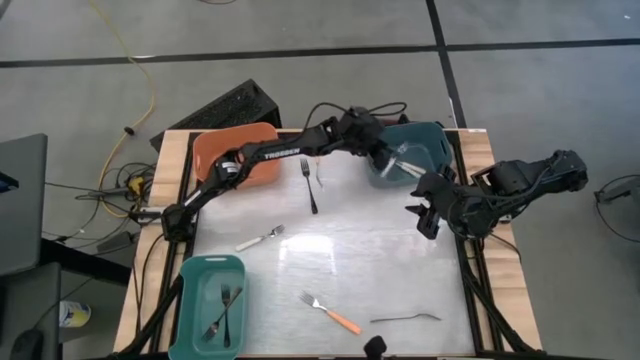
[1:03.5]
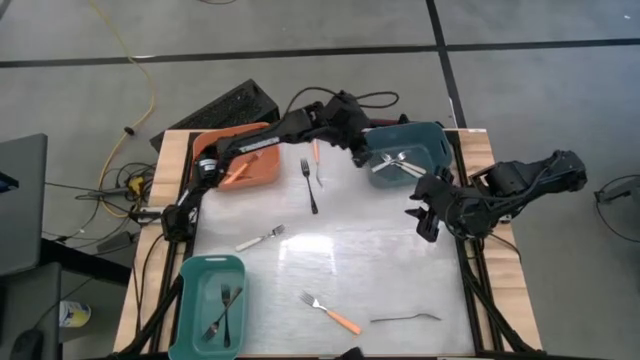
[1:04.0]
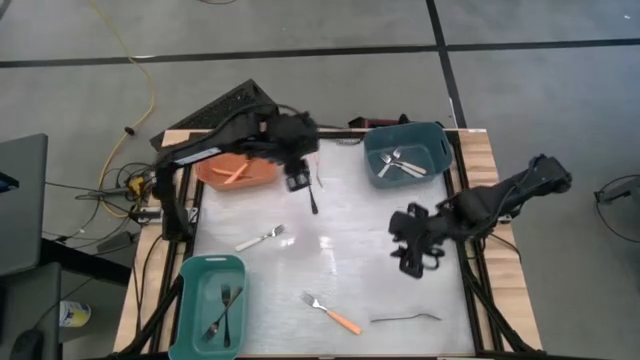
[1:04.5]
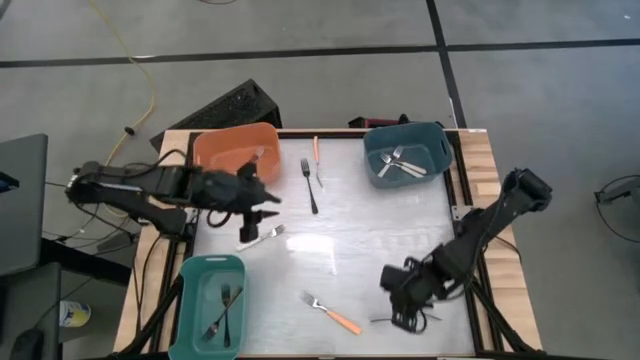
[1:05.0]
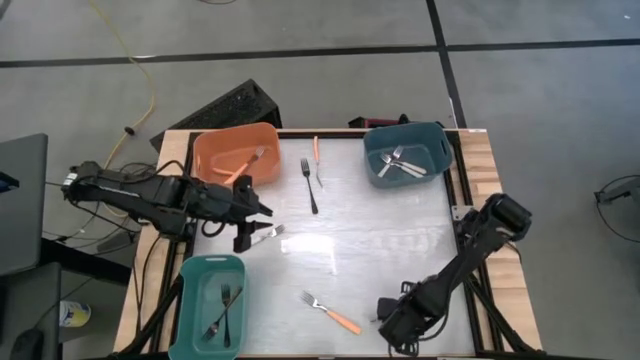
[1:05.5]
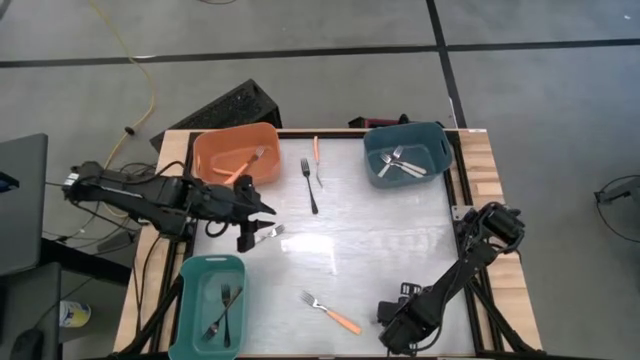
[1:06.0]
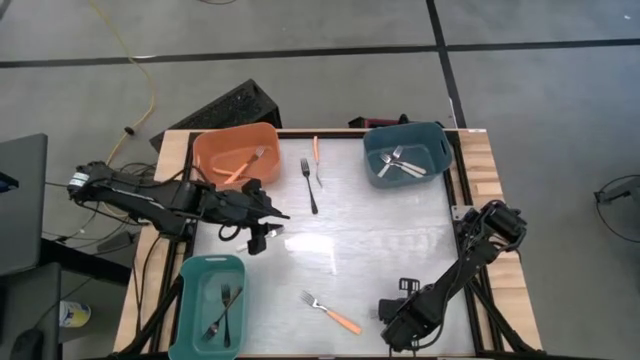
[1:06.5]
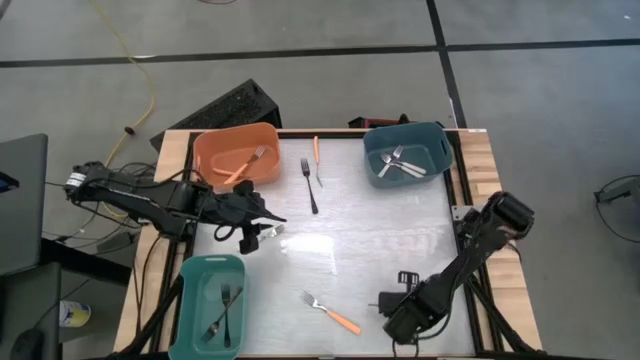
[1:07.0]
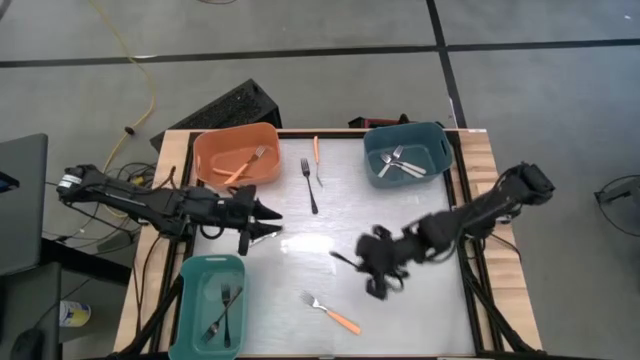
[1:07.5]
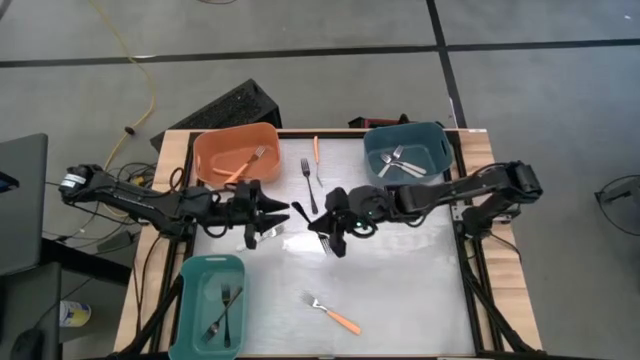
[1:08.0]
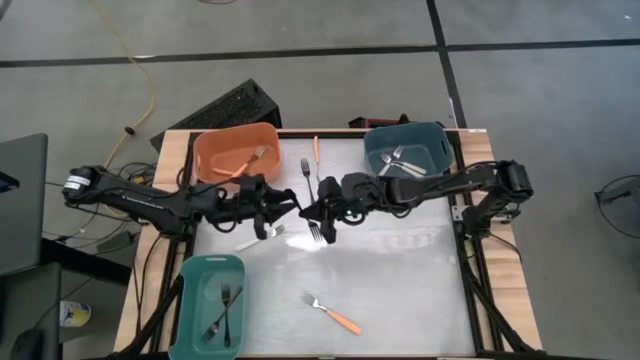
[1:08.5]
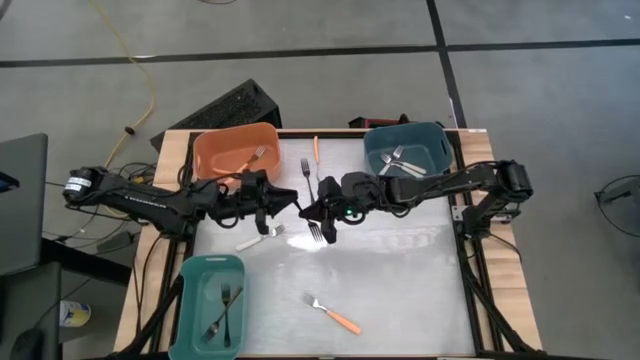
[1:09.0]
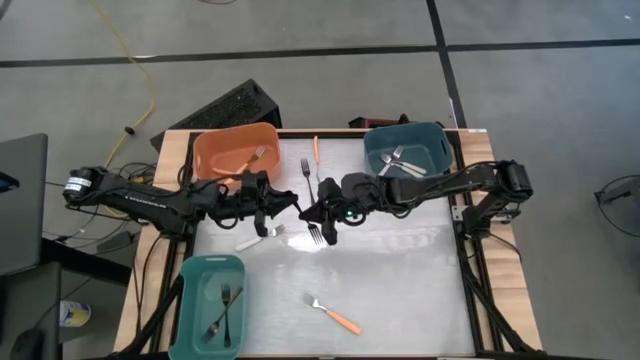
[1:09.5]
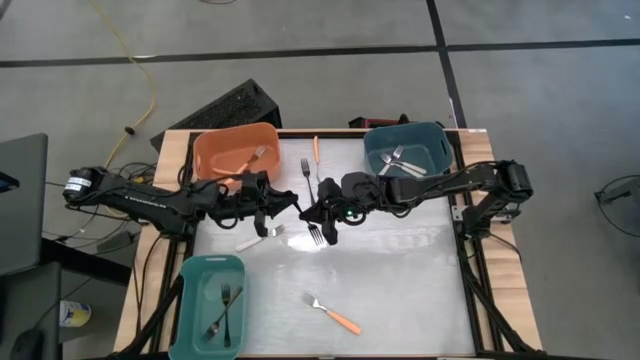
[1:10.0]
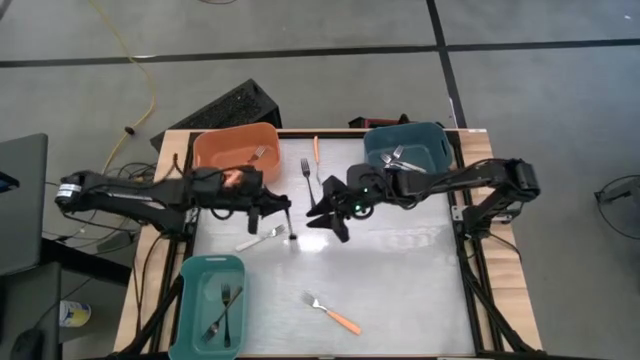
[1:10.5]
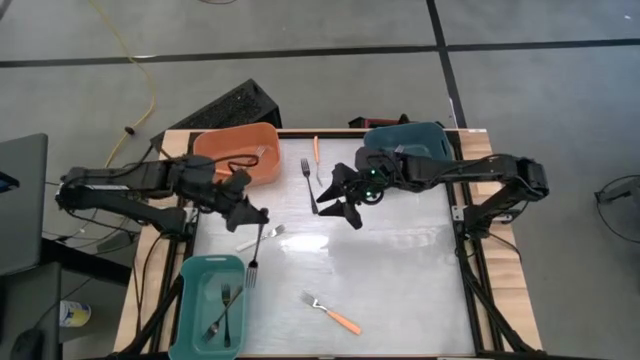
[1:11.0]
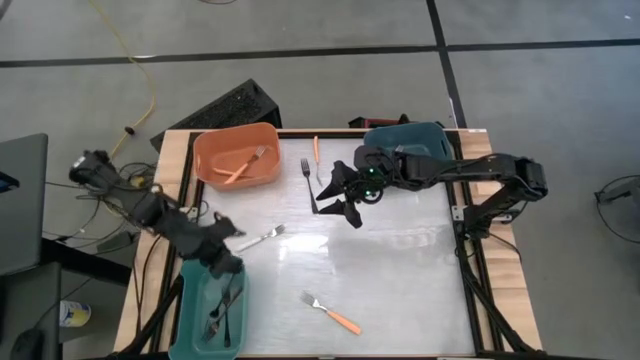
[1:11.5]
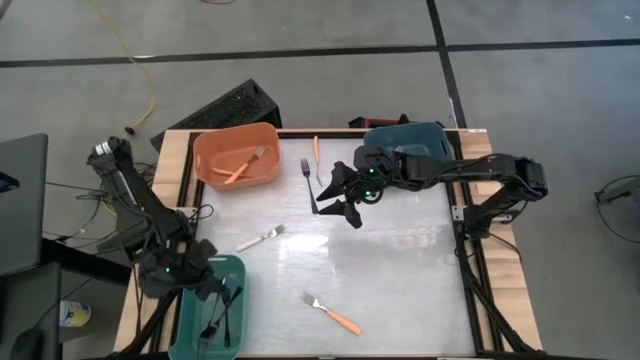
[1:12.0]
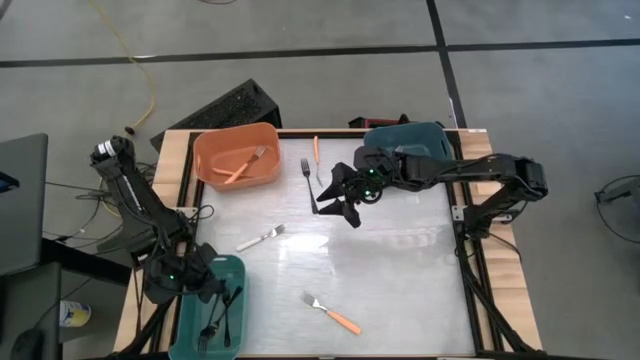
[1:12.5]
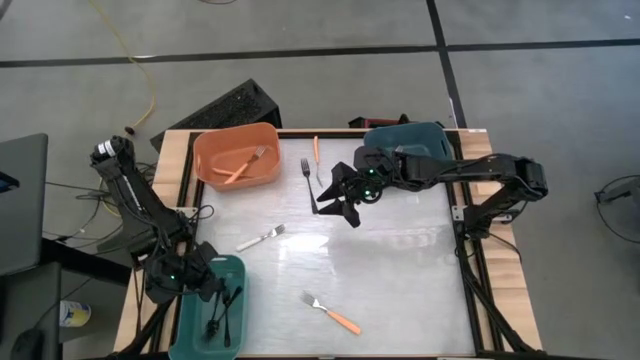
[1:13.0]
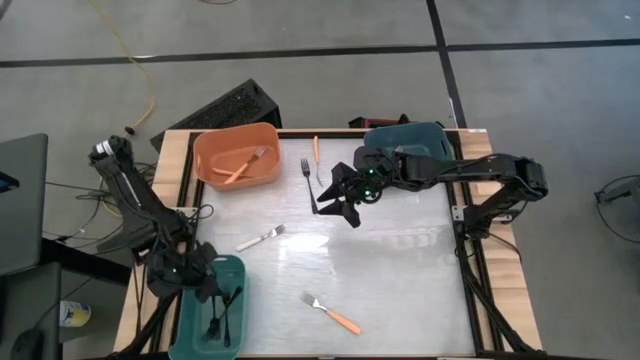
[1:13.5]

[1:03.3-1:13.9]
Task: Sort silverware by color (type)
Put the black fork into the green bin

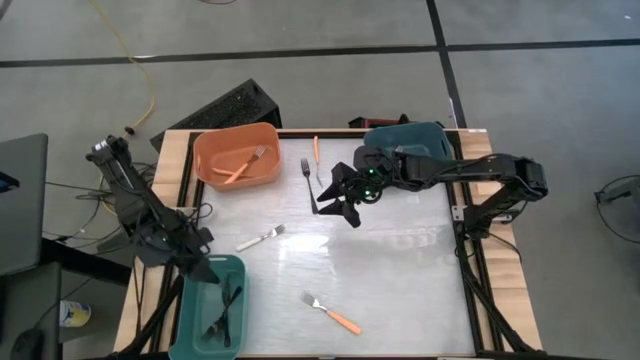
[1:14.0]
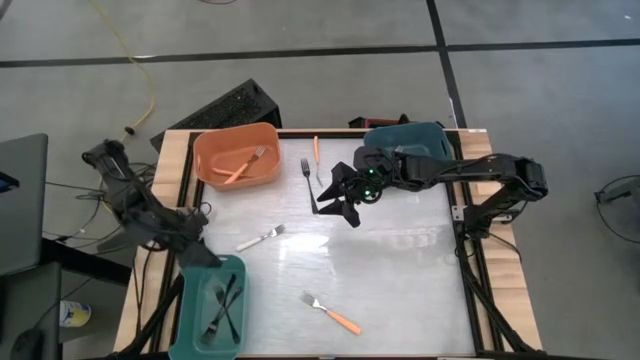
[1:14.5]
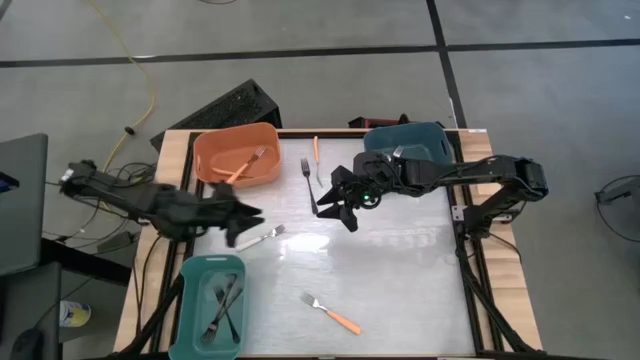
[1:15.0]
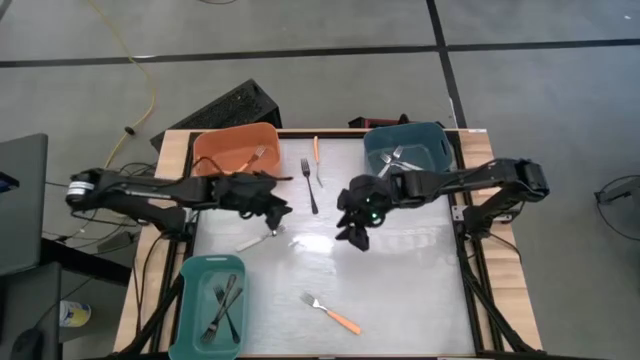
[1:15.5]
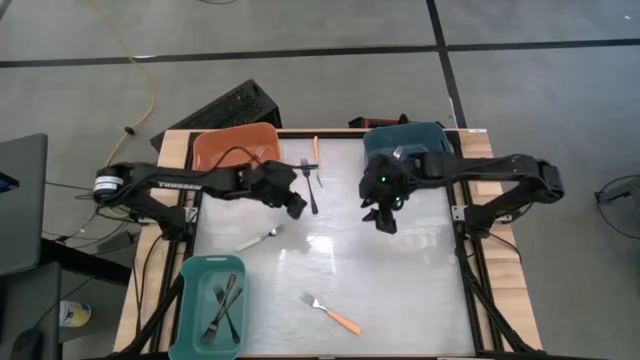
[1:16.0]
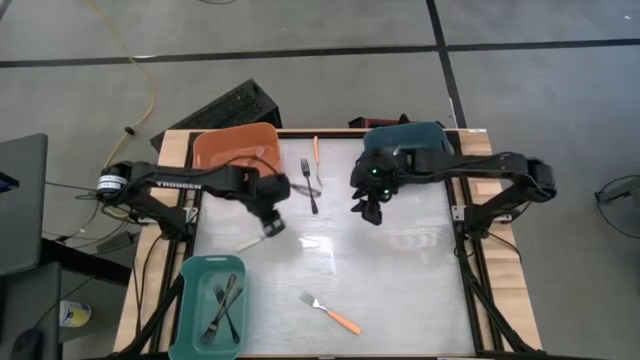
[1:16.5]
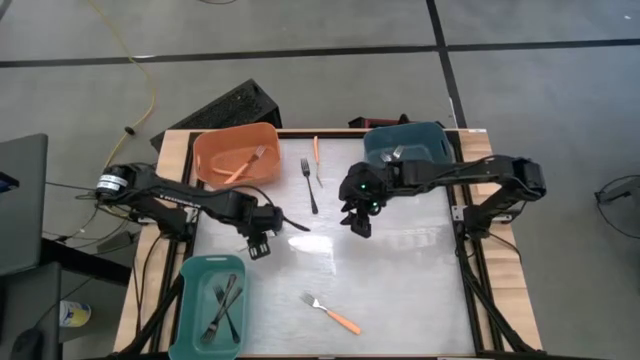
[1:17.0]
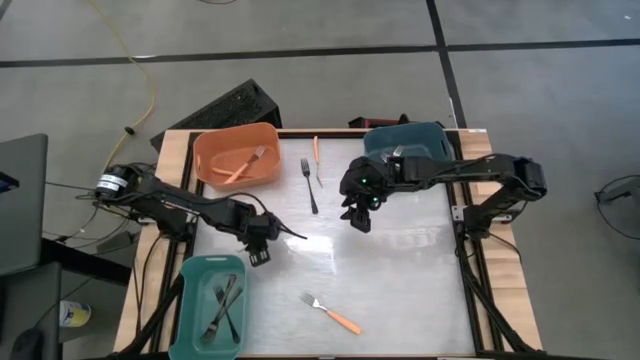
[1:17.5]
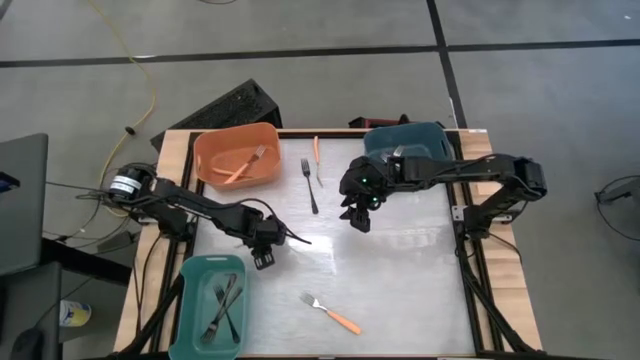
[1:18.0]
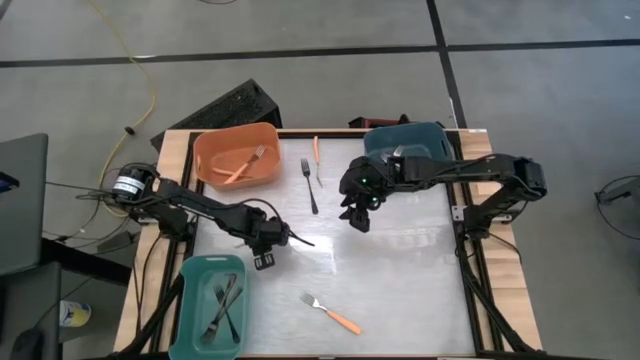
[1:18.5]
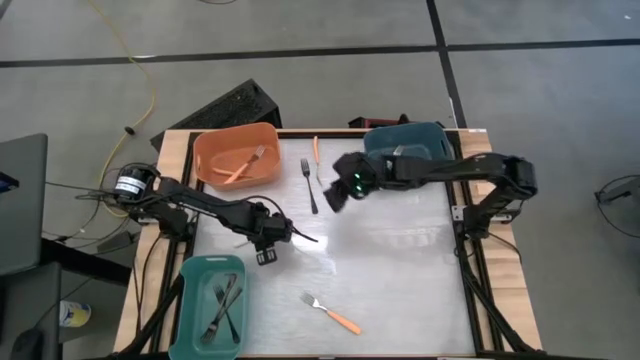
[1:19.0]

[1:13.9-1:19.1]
Put the white fork into the blue bin

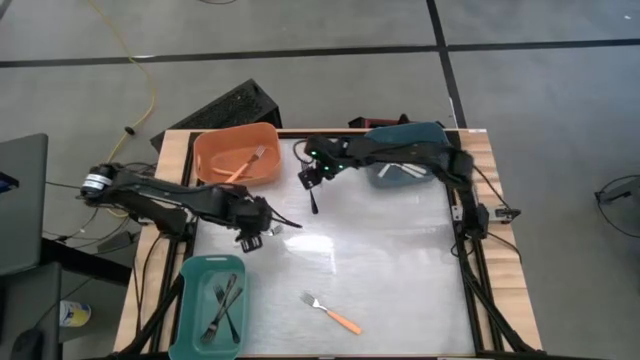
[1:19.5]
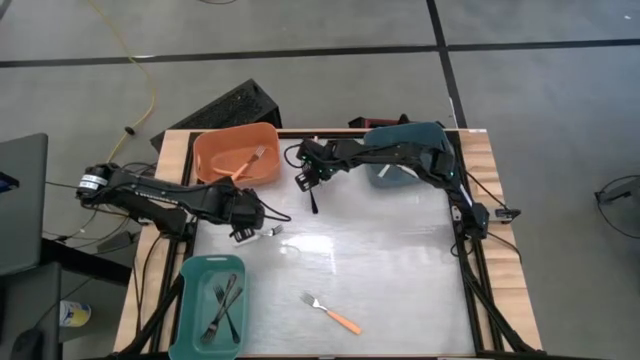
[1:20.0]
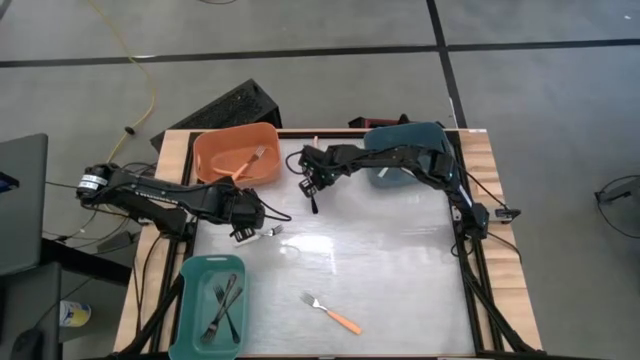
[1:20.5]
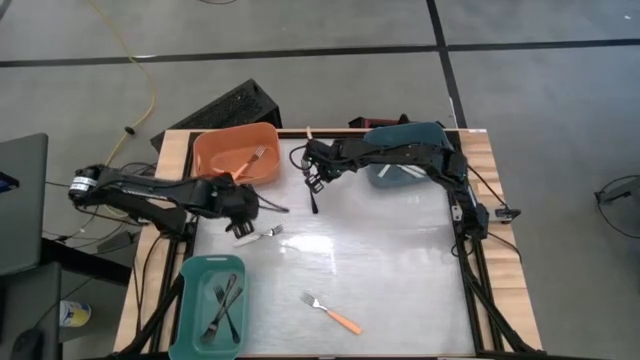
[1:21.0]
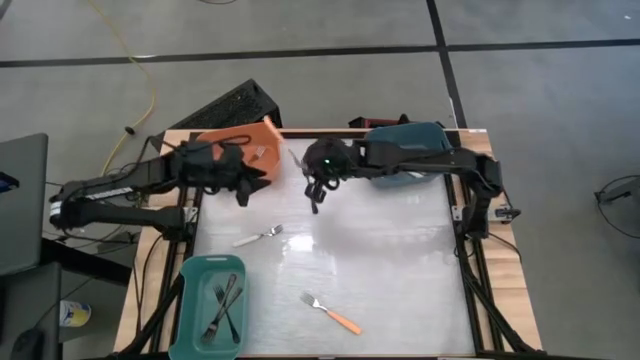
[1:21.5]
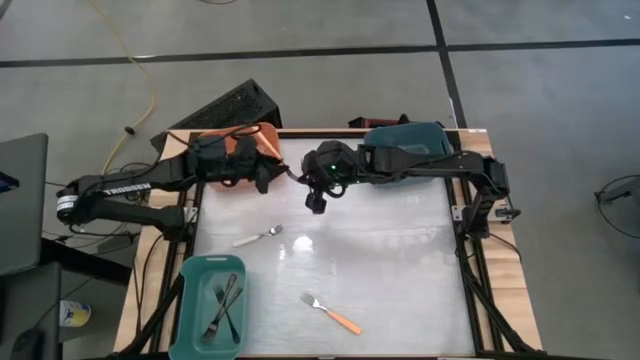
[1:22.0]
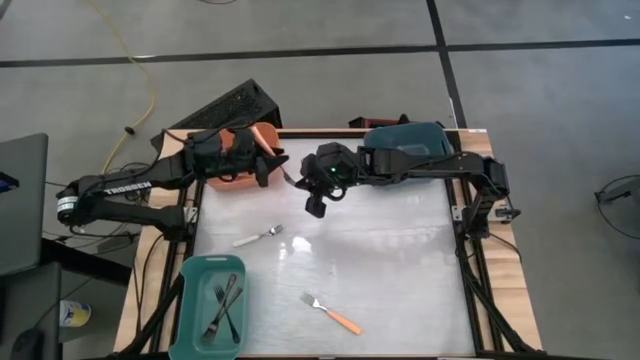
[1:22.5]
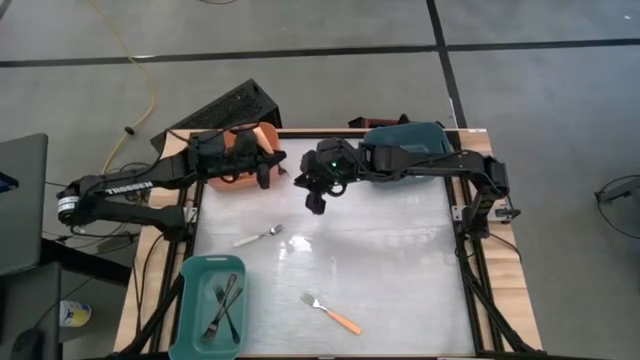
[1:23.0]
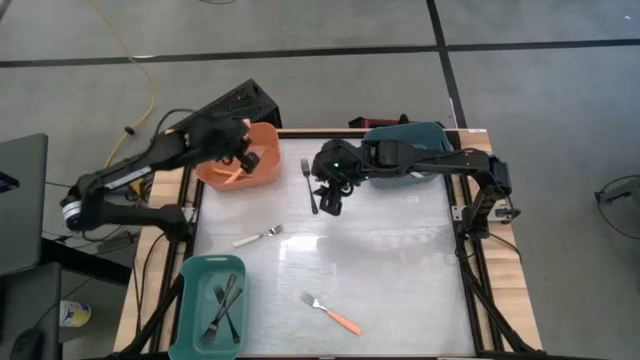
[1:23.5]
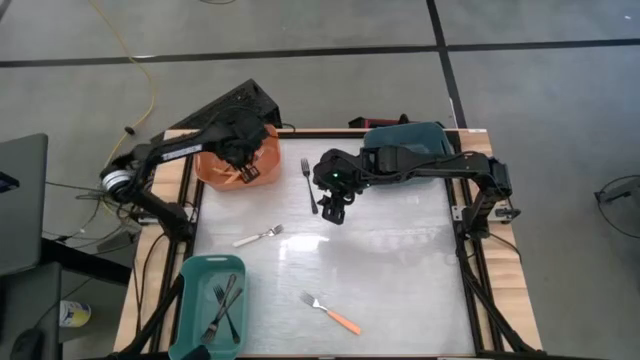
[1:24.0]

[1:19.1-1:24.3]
Put the orange fork into the orange bin
